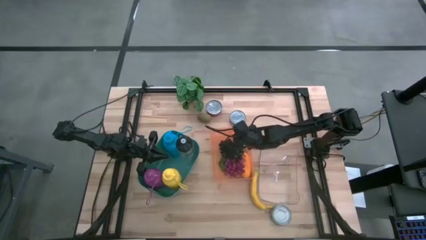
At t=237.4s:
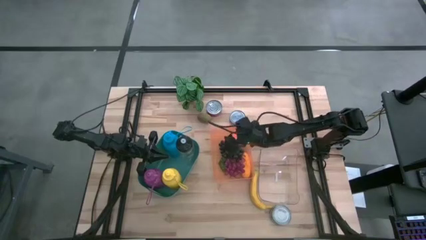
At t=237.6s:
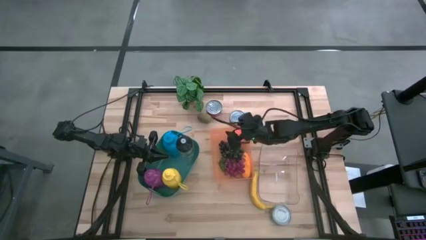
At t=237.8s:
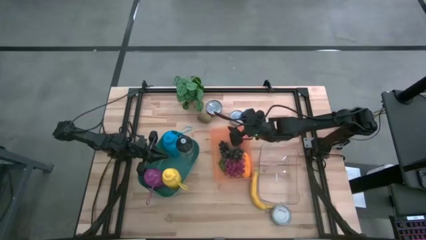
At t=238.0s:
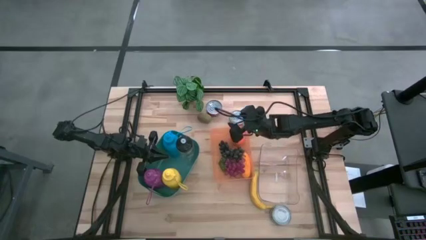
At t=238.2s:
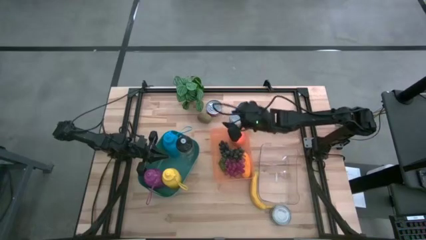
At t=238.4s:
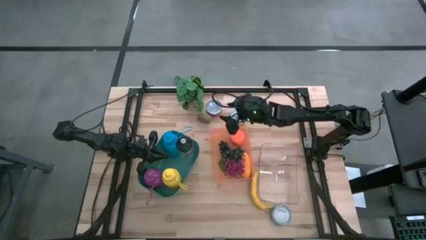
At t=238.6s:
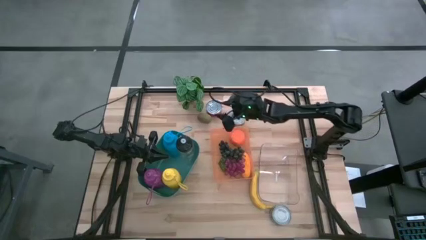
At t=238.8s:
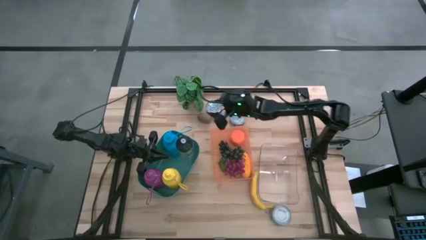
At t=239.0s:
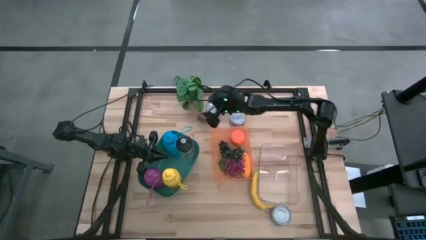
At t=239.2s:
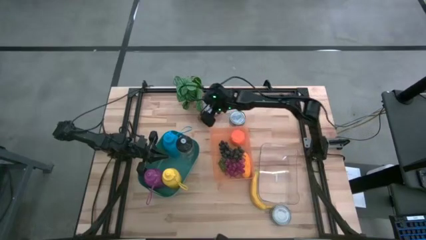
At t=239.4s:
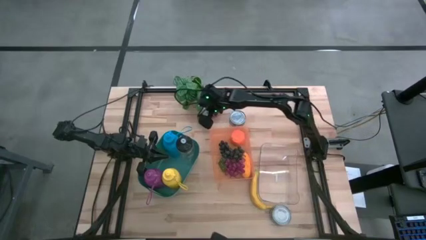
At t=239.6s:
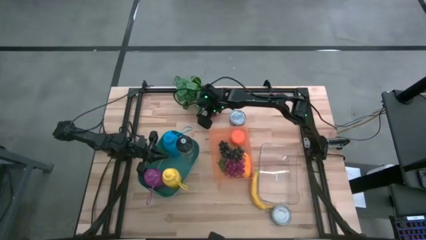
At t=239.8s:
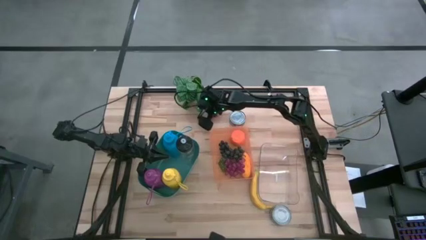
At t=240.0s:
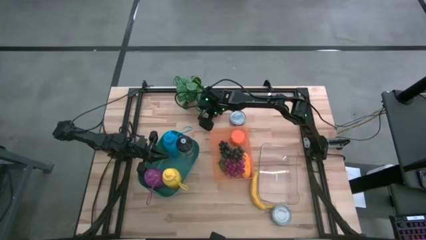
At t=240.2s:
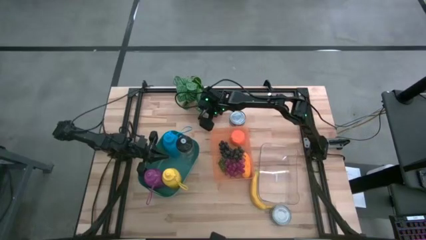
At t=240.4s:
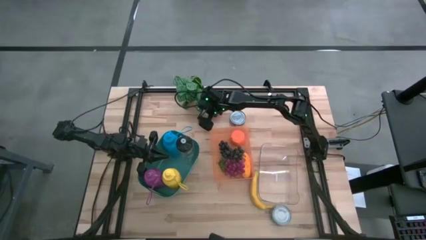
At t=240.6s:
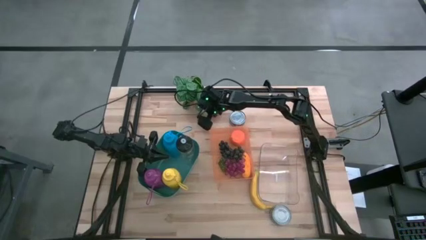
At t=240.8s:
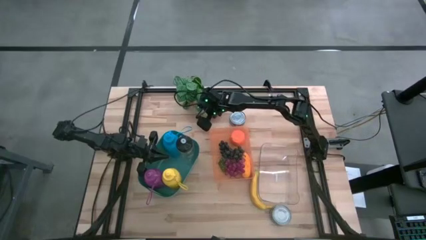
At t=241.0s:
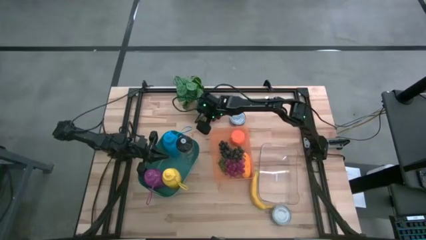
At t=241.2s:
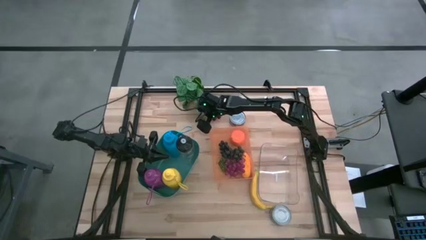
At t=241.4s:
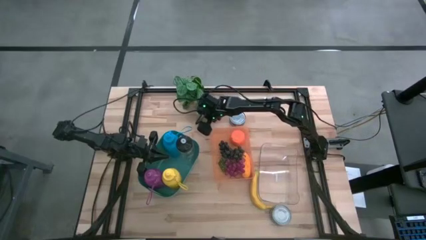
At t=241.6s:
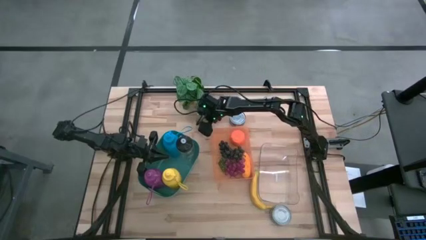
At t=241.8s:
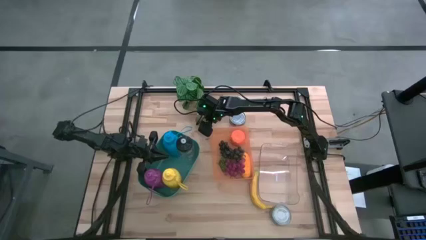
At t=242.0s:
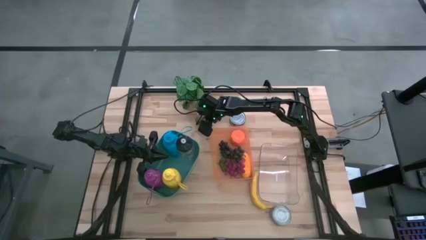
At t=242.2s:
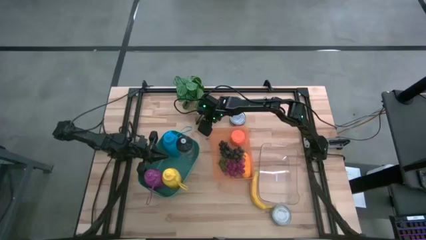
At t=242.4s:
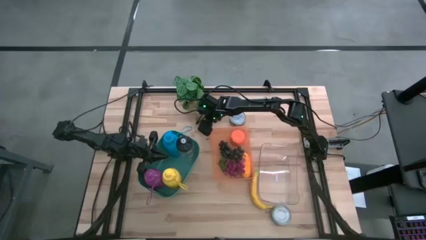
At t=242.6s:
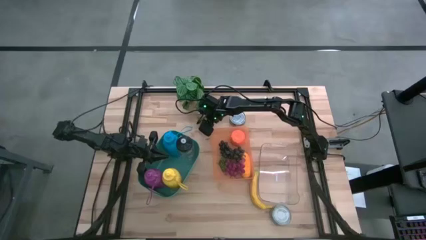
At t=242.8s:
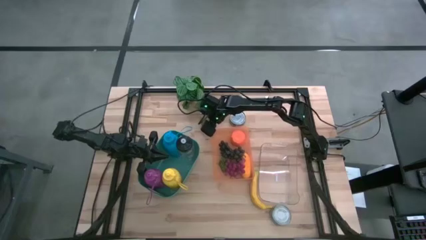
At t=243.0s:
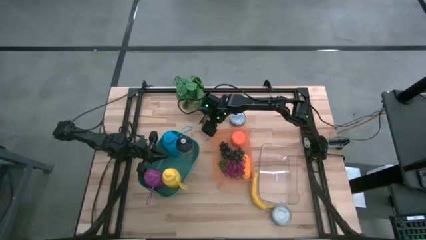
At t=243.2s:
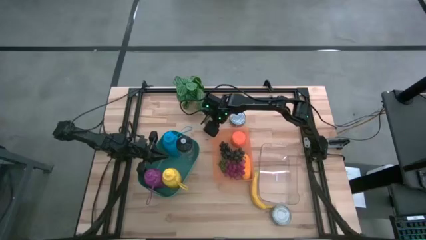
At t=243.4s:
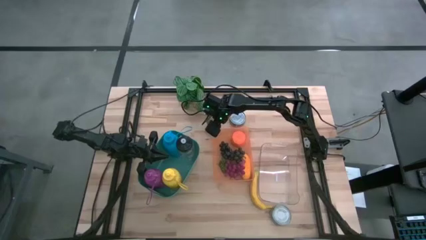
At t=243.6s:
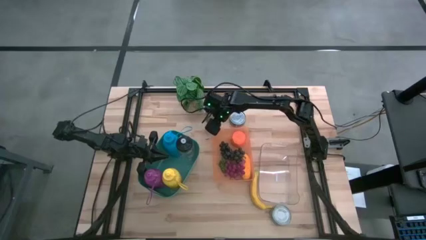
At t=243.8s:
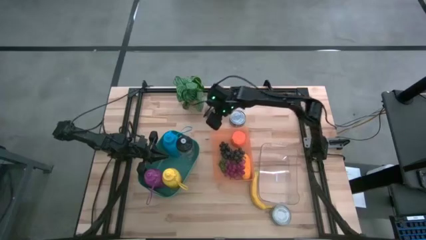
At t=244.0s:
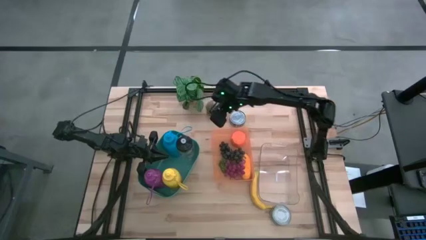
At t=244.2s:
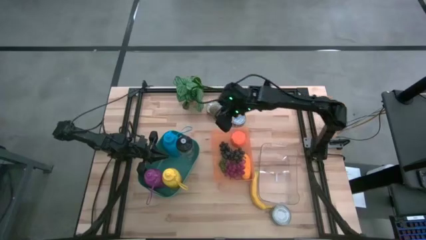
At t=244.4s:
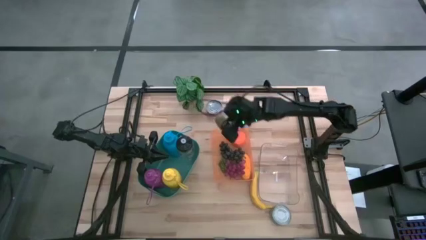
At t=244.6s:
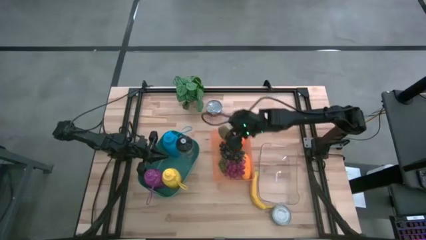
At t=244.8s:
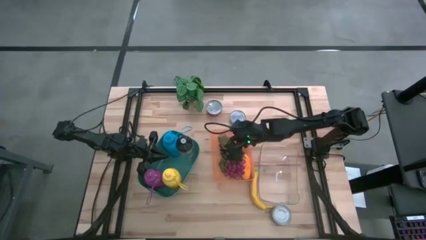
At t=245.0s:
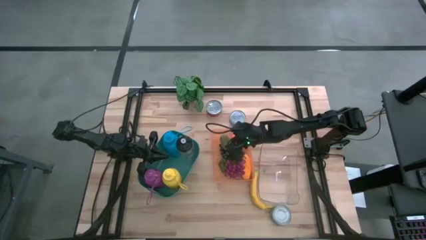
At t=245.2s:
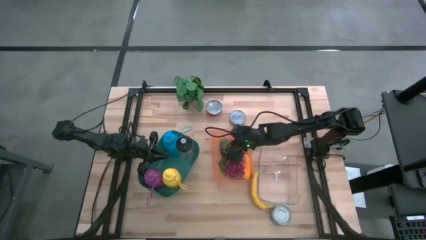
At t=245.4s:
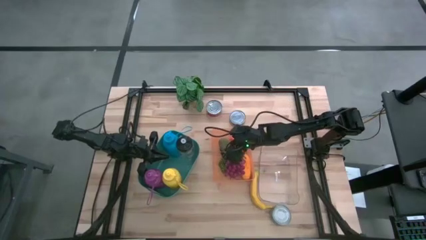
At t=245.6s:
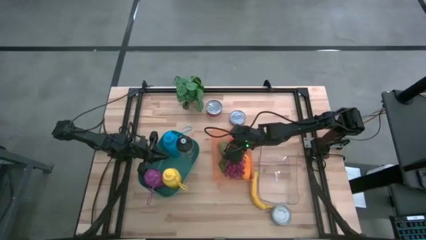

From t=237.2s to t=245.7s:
Task: Pick & Place Food Item
Put the brown kiwi into the orange bin

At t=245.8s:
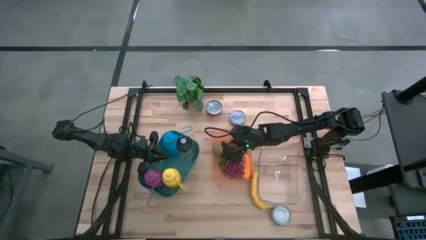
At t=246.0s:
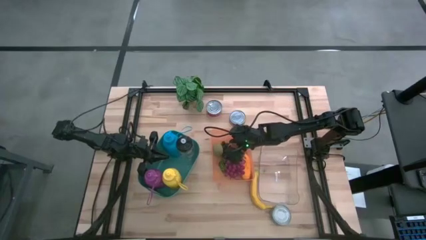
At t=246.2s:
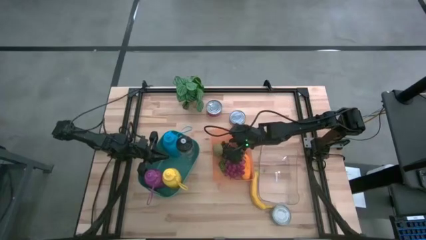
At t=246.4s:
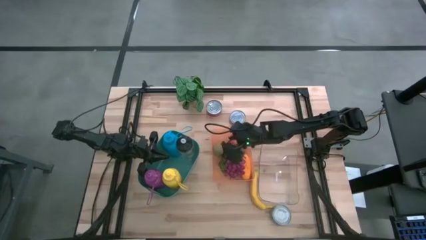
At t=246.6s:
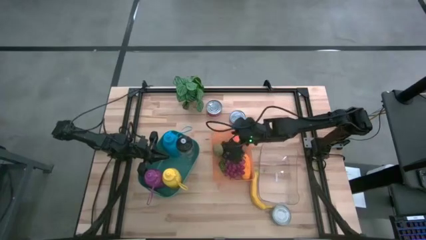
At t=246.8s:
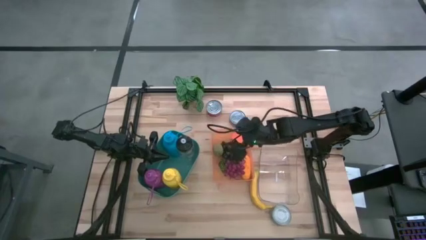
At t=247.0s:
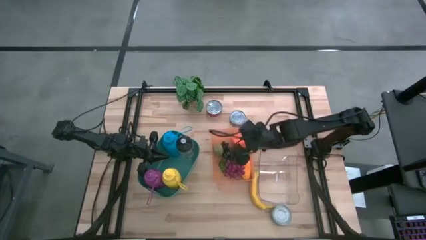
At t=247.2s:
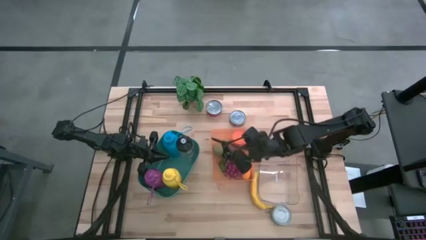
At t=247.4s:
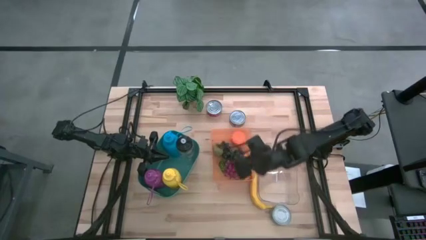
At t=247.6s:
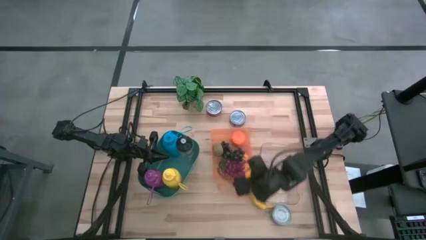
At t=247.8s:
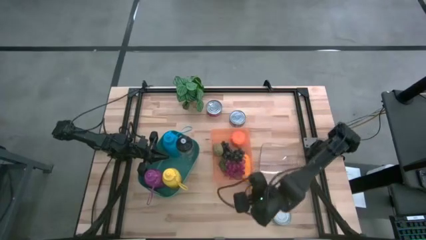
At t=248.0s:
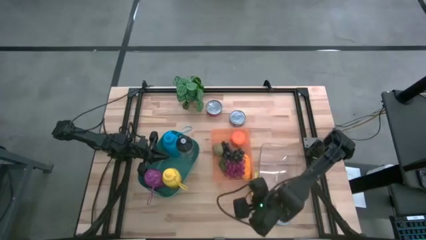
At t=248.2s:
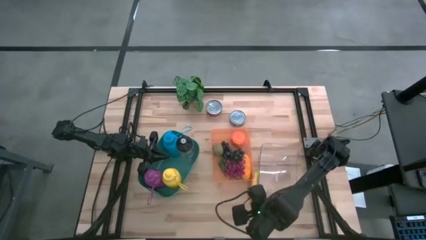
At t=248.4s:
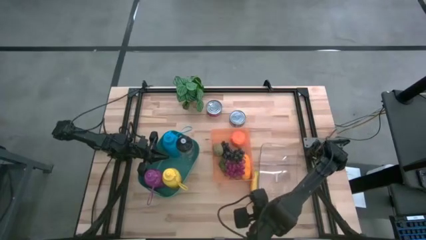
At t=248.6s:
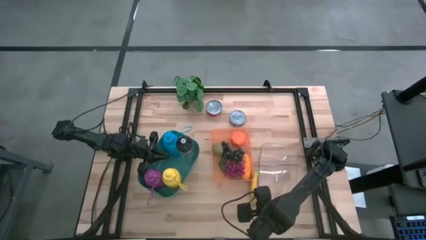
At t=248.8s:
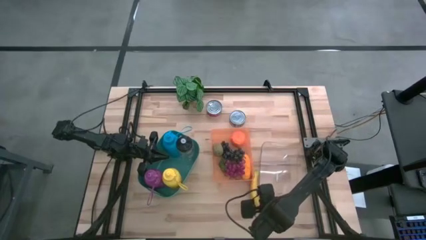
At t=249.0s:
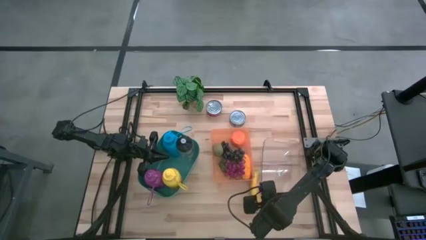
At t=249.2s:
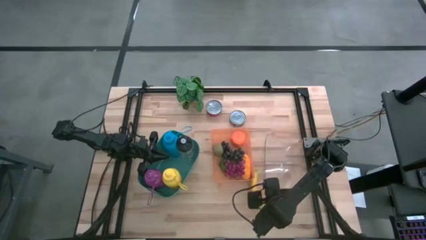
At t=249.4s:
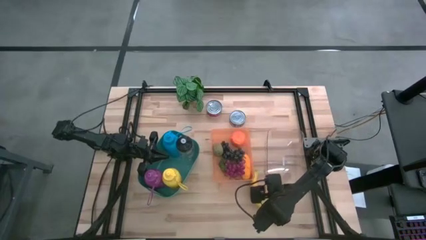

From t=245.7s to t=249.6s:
Adjust the transparent bin
